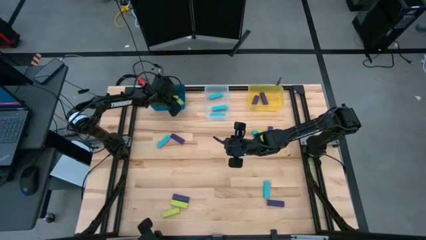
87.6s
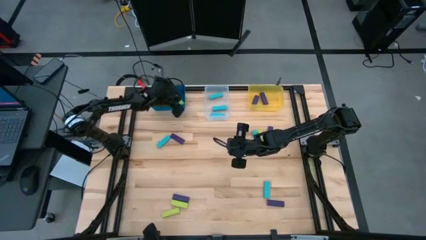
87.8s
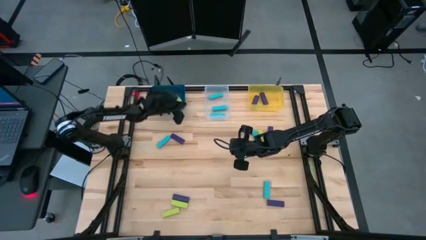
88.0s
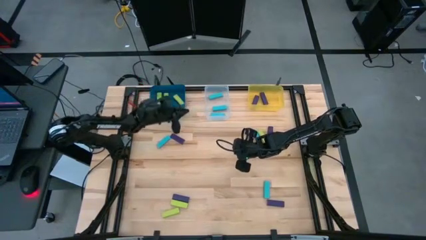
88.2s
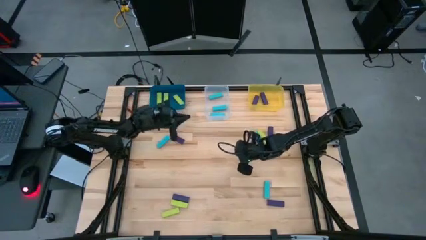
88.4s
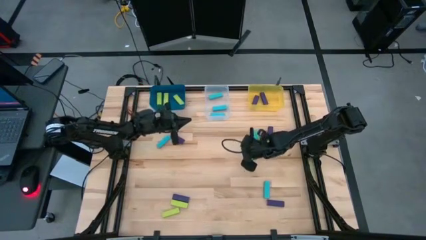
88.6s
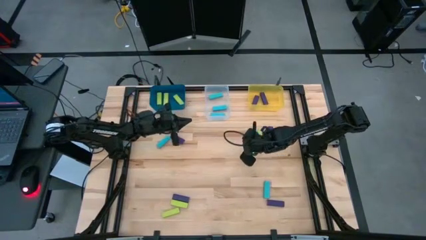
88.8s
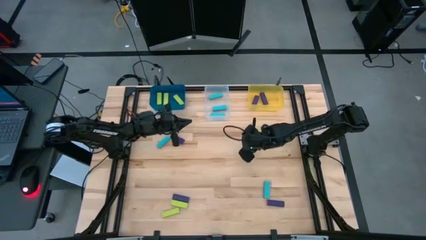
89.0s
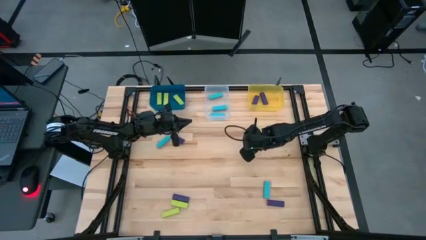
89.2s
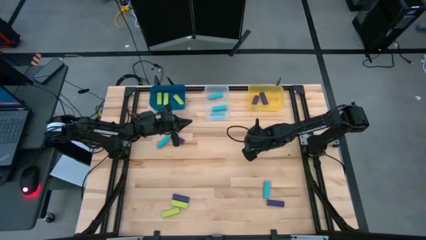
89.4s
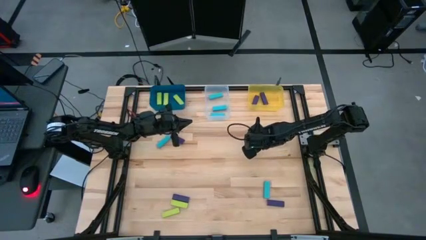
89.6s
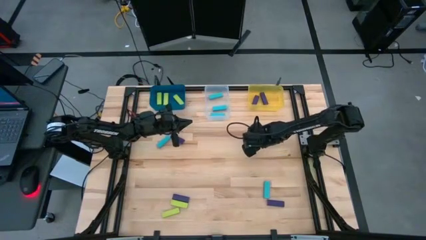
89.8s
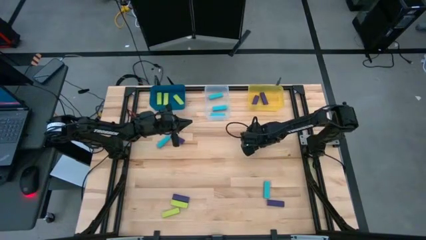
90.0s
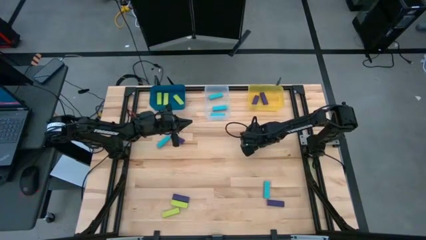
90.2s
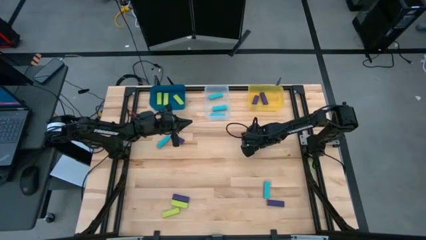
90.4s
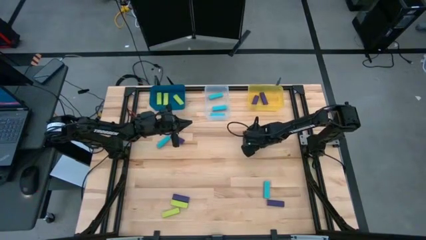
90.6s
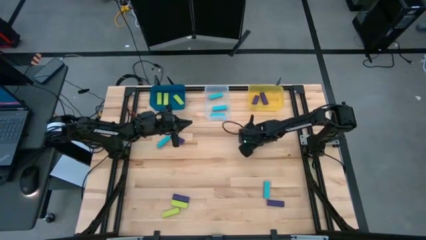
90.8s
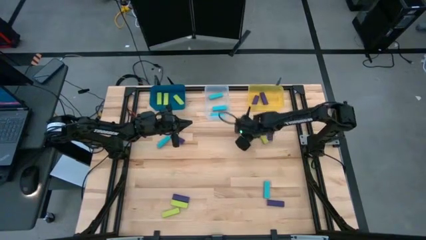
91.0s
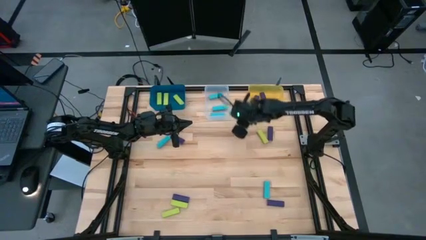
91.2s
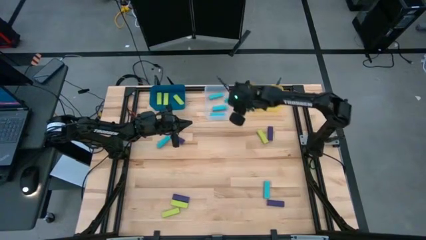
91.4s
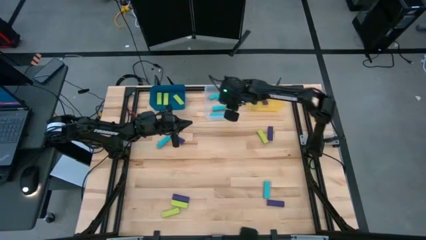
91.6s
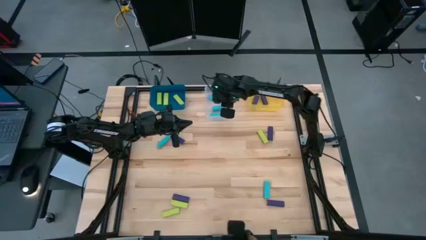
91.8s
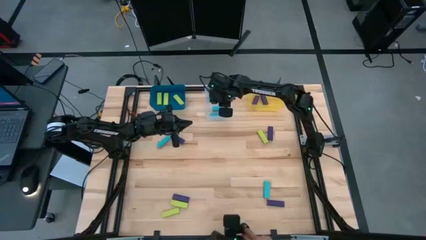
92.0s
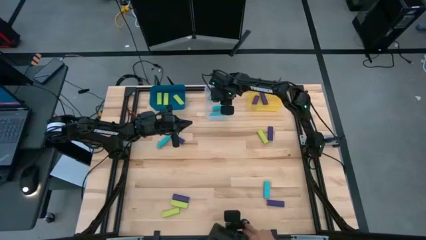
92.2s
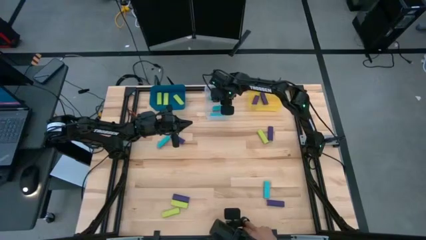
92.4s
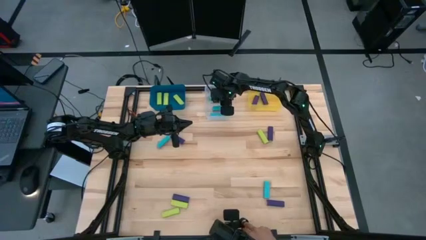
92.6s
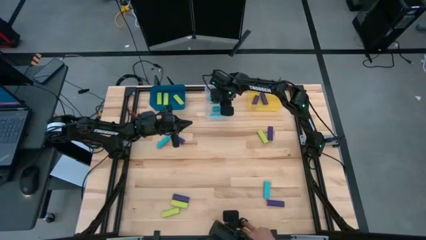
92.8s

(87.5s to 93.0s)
Task: Sort blocks
Put the blue block into the transparent bin

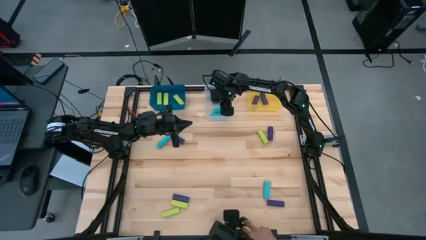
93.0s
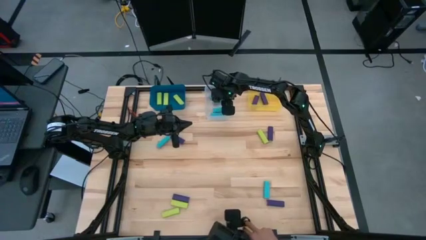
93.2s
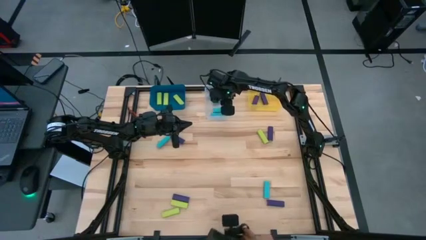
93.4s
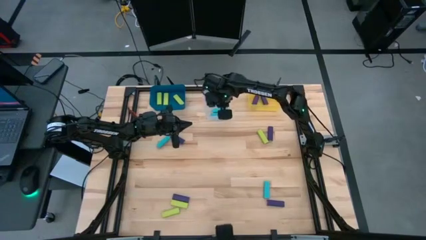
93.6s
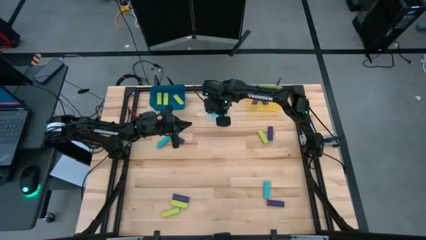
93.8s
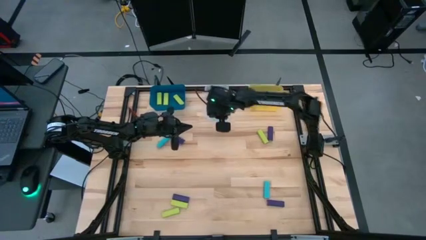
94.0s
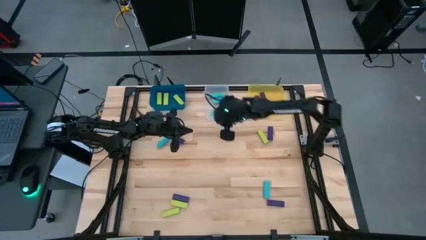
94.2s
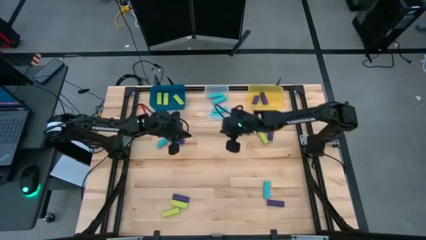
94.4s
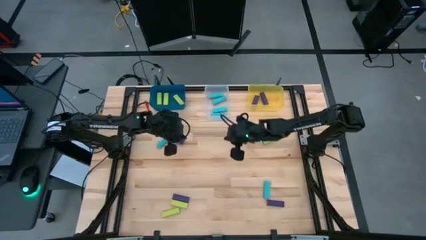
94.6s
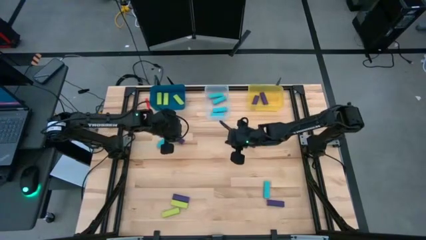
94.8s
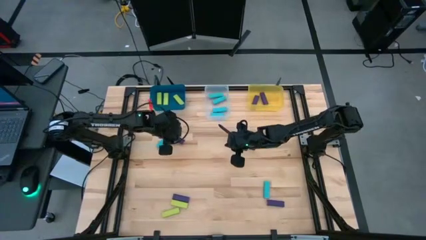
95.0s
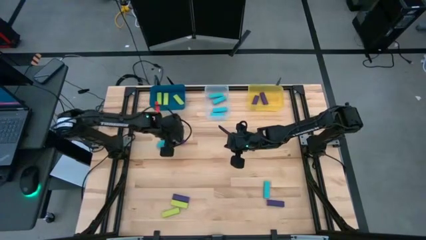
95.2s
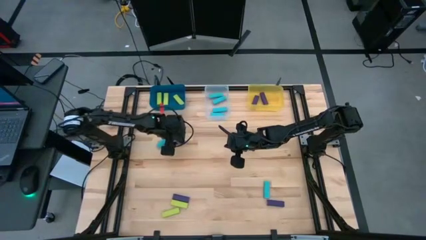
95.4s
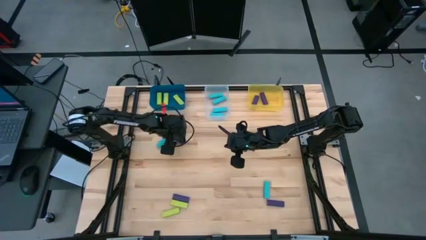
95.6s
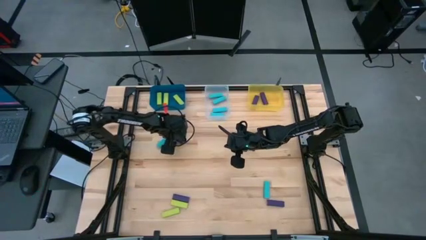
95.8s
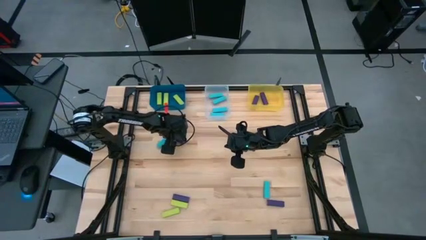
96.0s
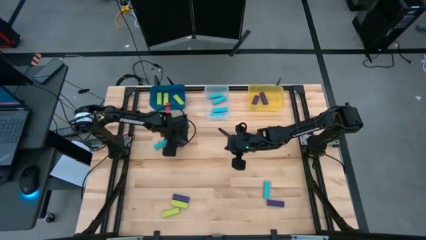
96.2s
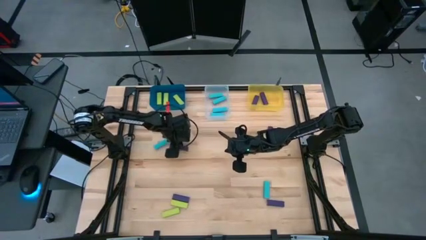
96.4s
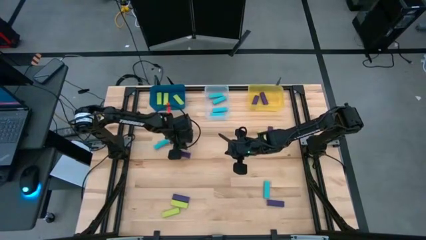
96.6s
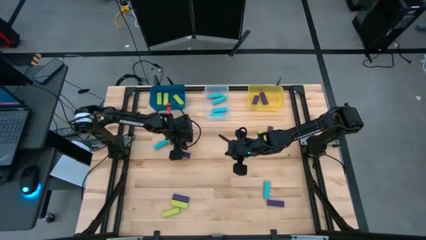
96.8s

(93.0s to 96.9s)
Put the violet block into the yellow bin

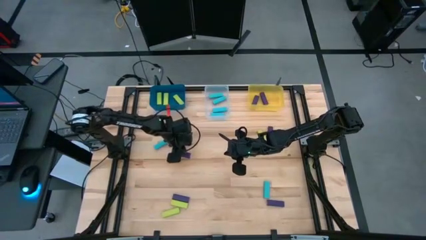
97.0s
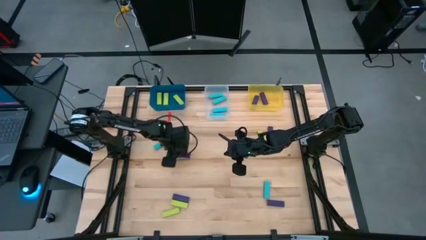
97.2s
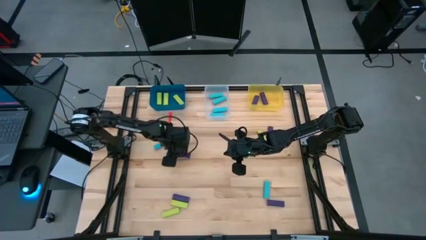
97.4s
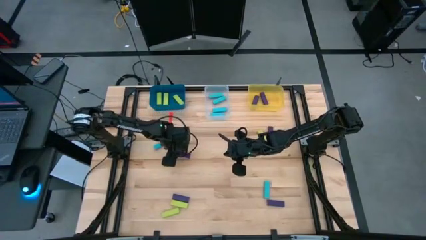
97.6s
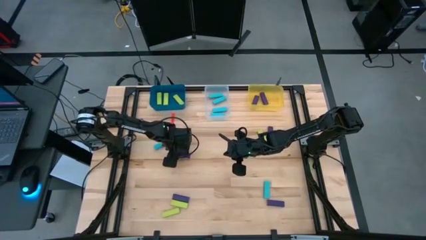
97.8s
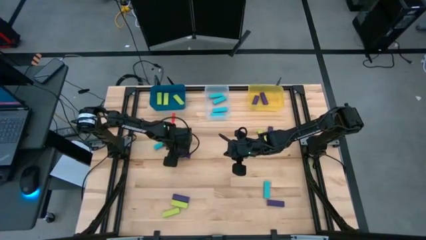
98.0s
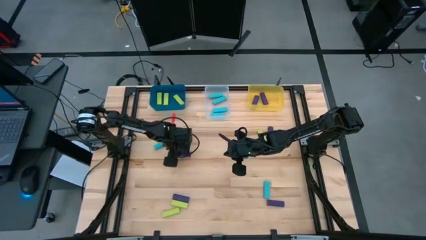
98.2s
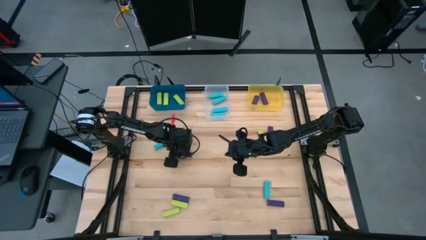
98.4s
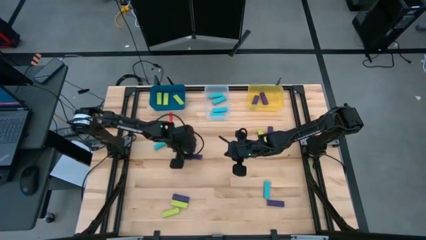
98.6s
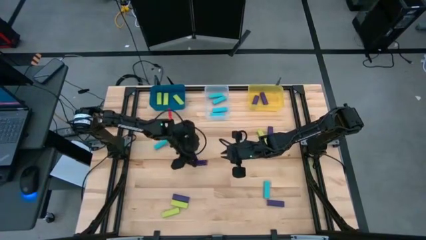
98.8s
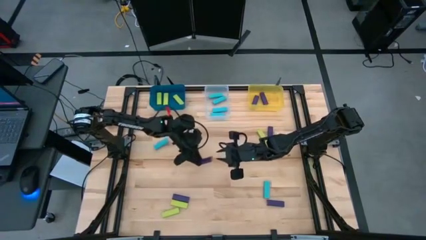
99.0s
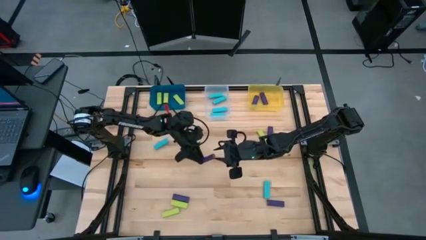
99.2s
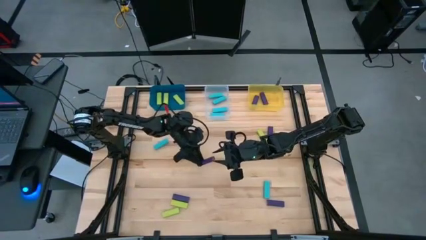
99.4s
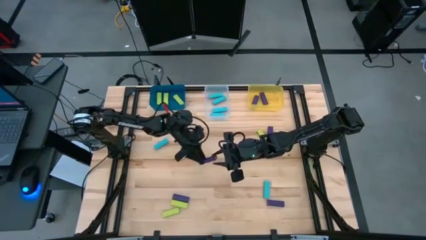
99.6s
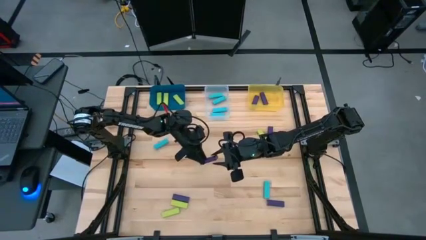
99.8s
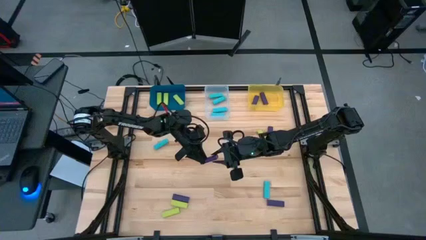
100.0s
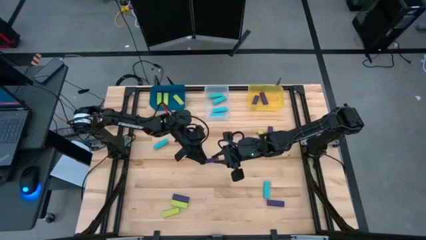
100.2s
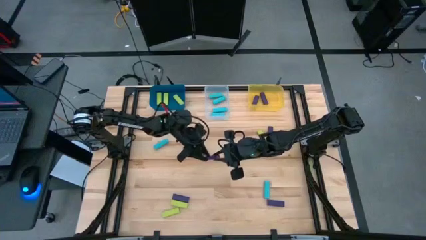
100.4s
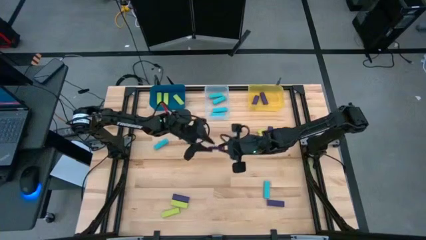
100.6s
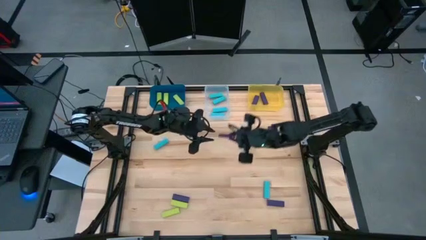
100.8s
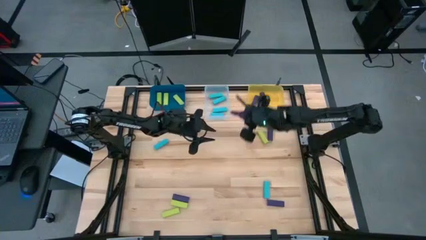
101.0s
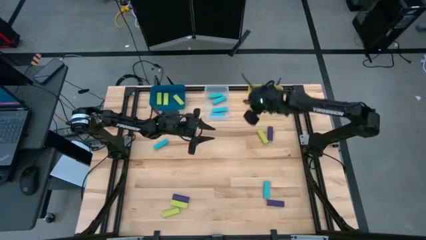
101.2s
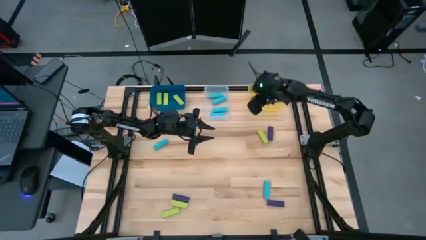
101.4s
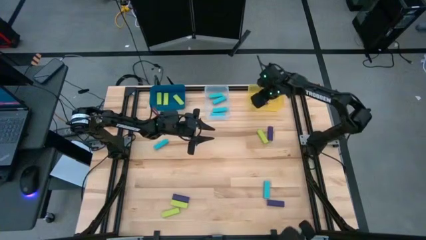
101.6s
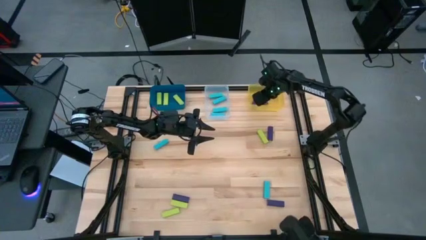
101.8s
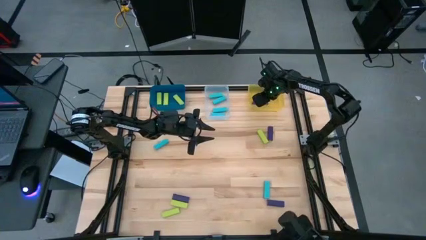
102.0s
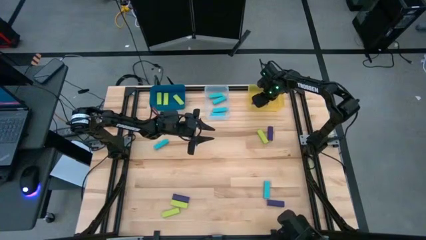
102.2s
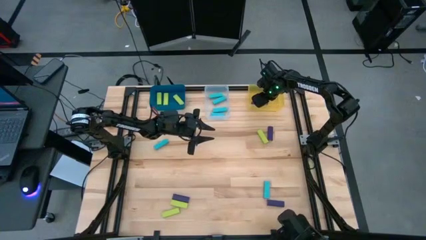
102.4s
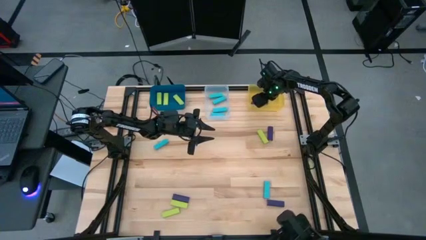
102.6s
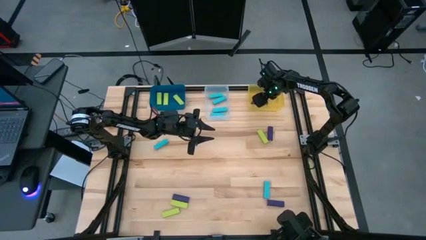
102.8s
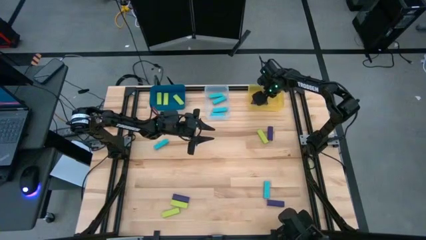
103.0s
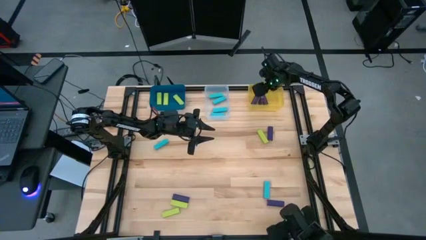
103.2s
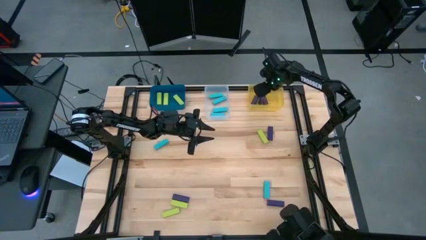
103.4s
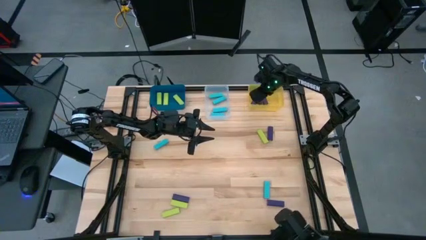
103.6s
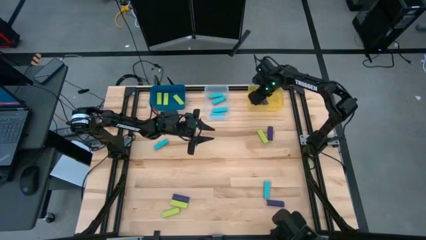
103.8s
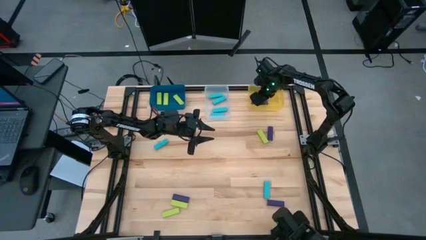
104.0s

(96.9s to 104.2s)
Put the violet block into the yellow bin
